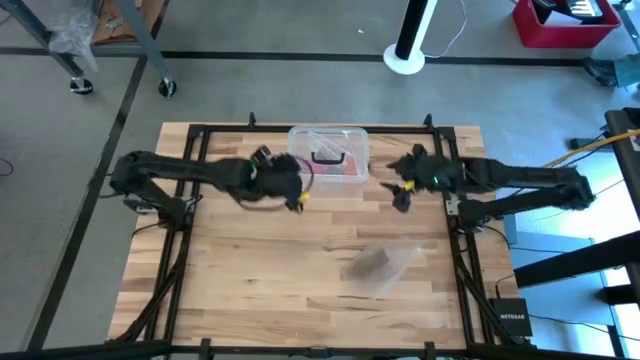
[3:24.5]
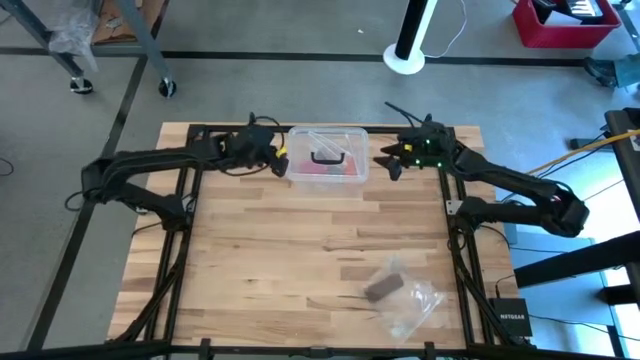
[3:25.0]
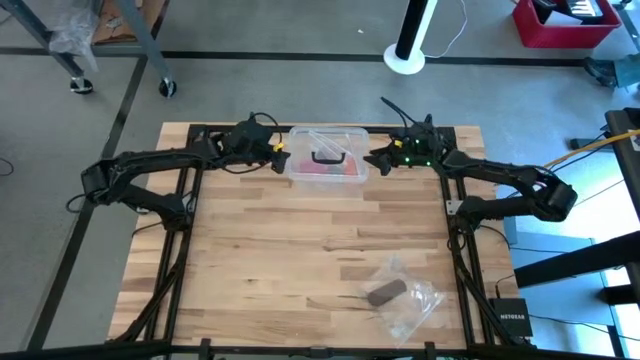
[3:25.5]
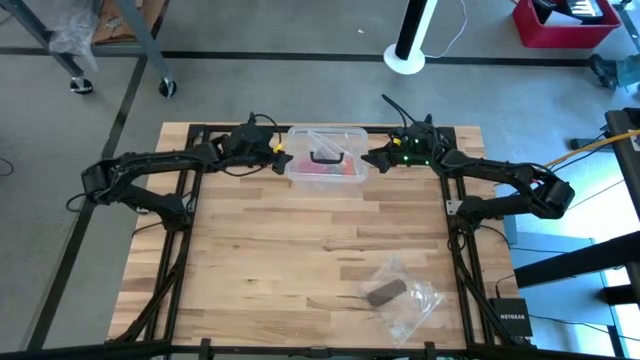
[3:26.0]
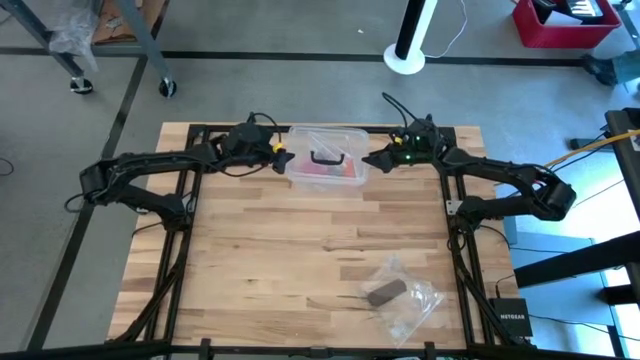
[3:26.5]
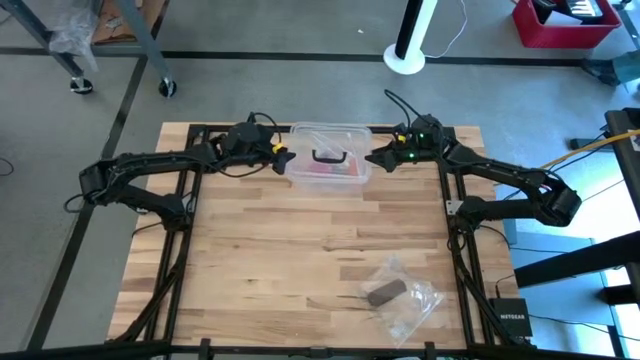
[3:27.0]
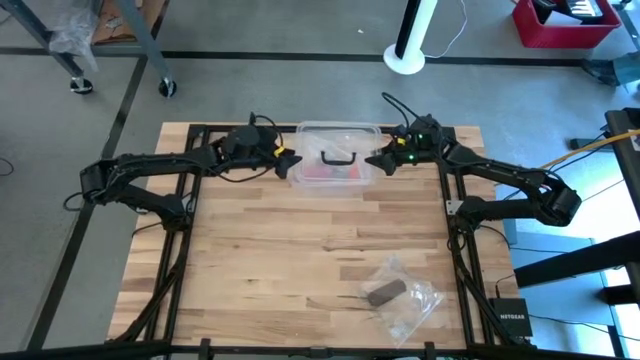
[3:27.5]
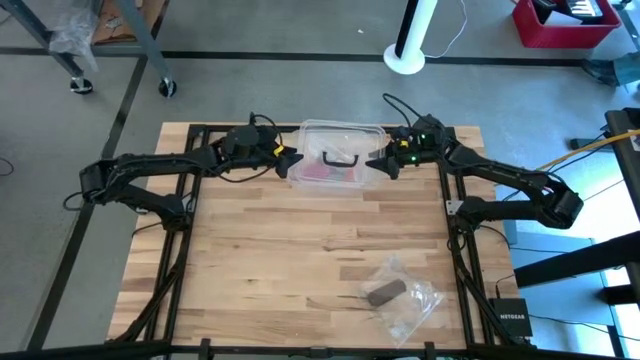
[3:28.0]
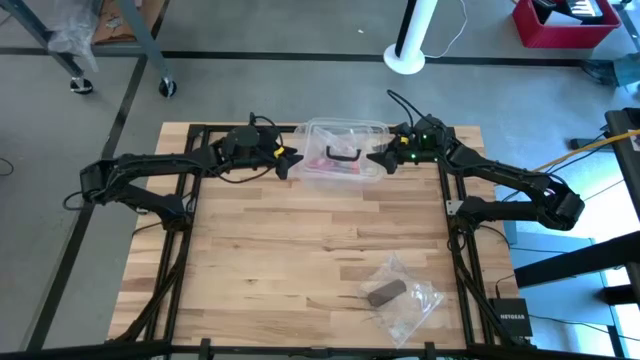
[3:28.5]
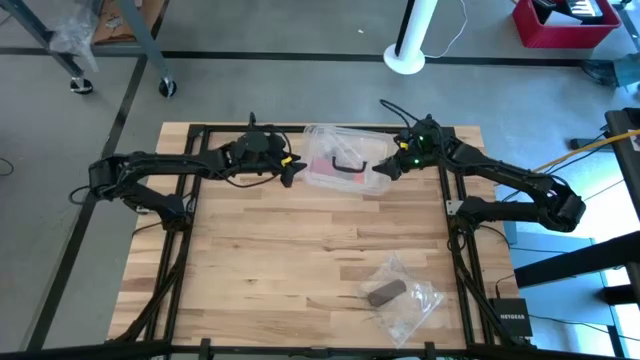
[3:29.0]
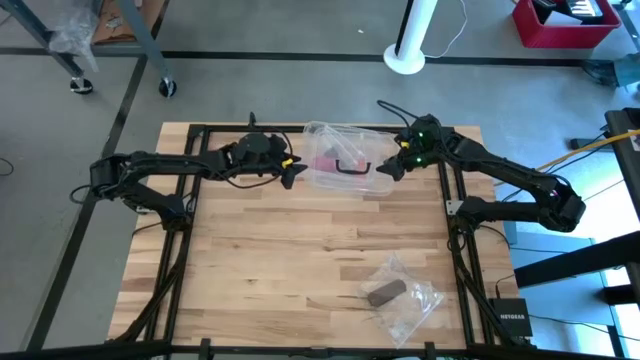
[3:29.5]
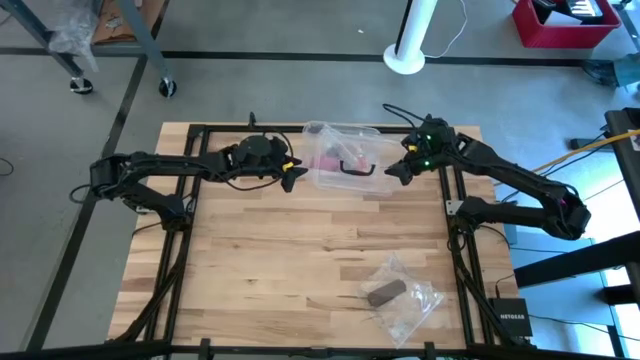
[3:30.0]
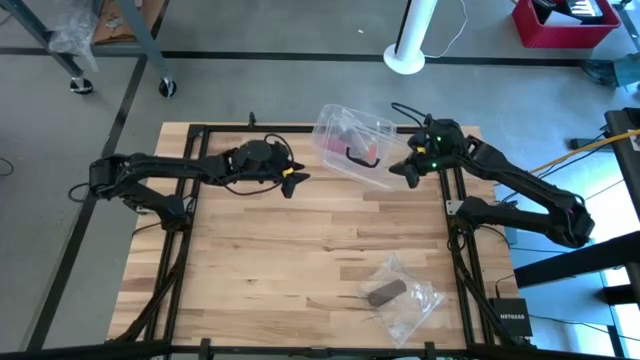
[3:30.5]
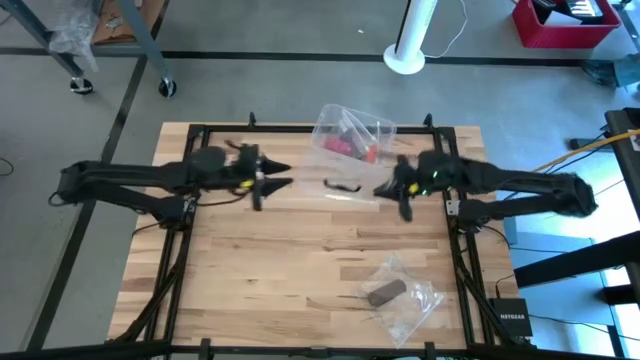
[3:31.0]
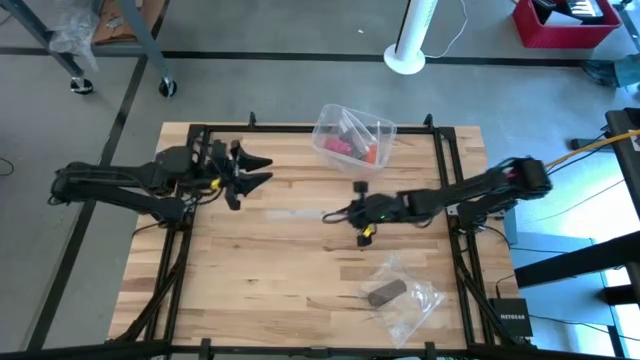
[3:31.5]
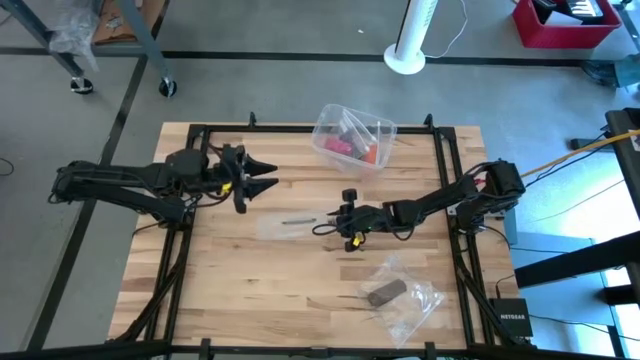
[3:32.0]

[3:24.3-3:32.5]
Task: Roll bandage
Open the transparent bin

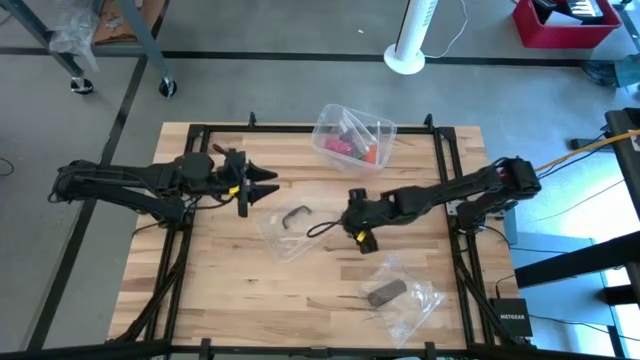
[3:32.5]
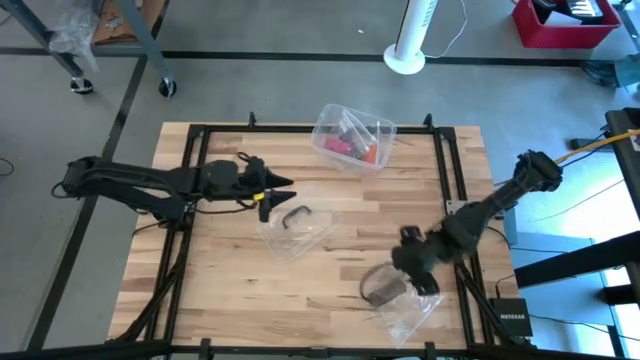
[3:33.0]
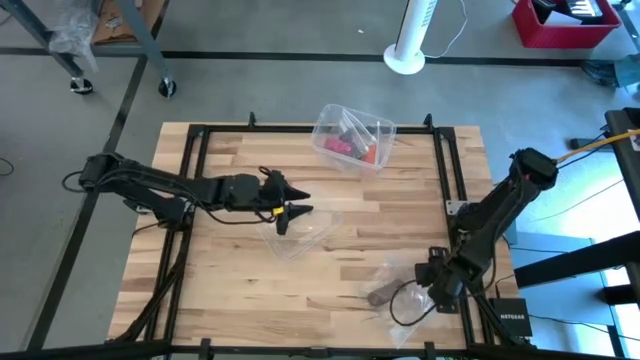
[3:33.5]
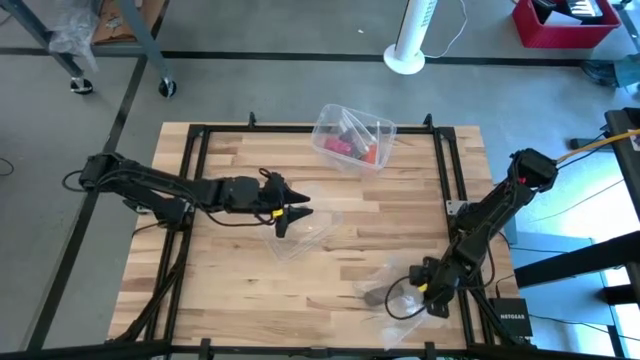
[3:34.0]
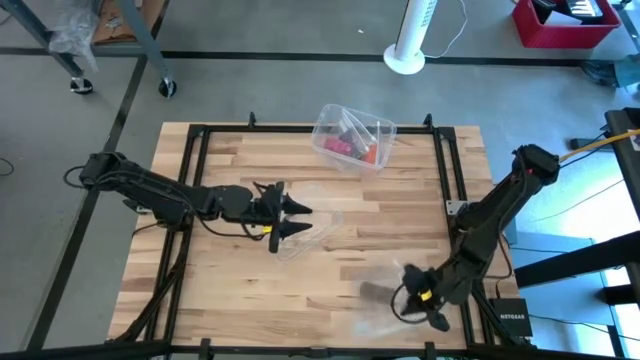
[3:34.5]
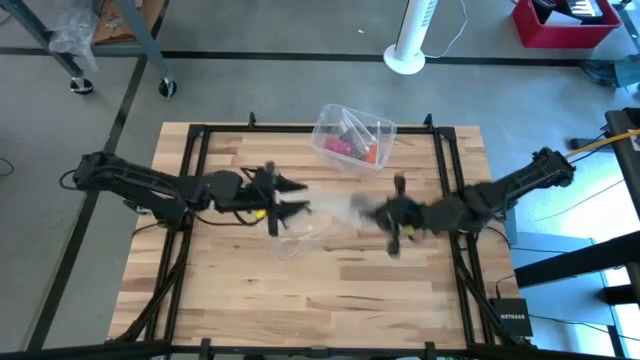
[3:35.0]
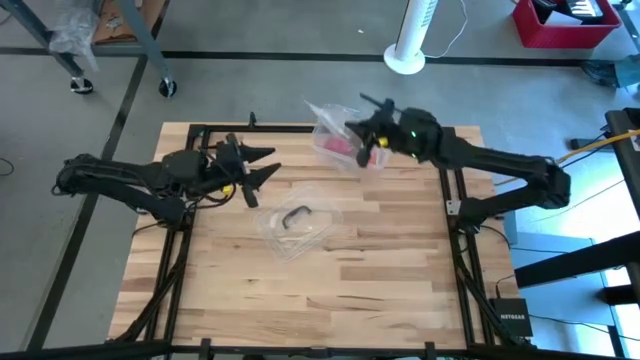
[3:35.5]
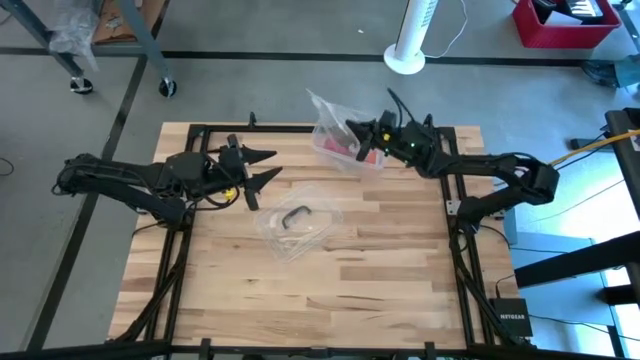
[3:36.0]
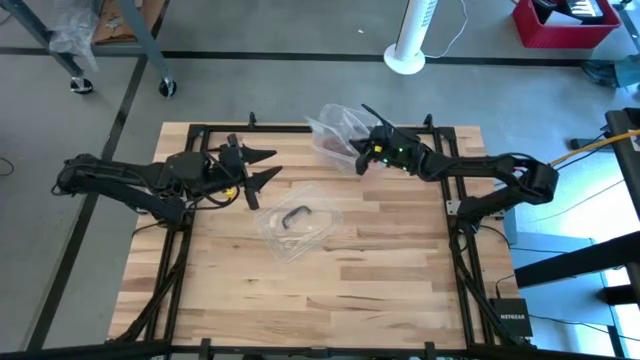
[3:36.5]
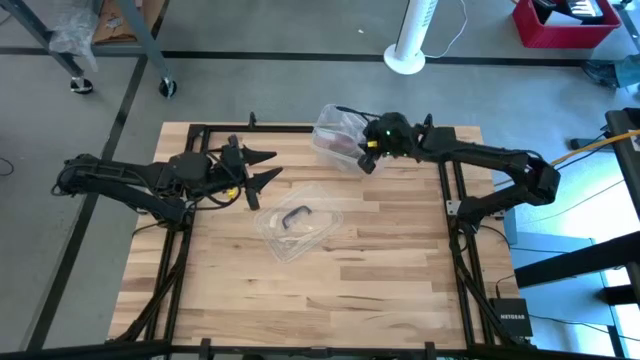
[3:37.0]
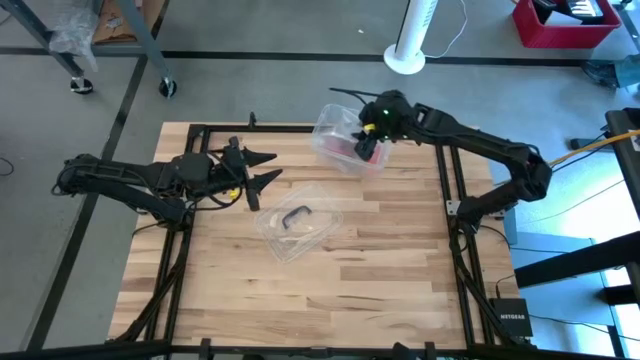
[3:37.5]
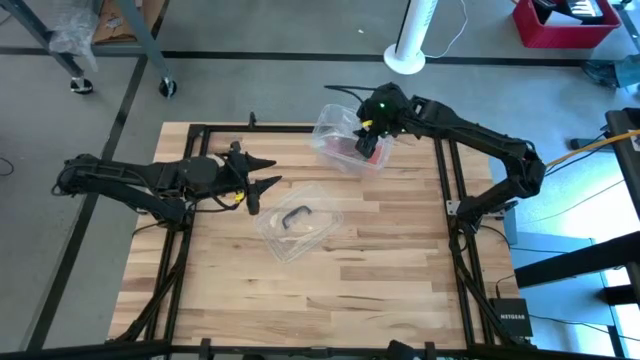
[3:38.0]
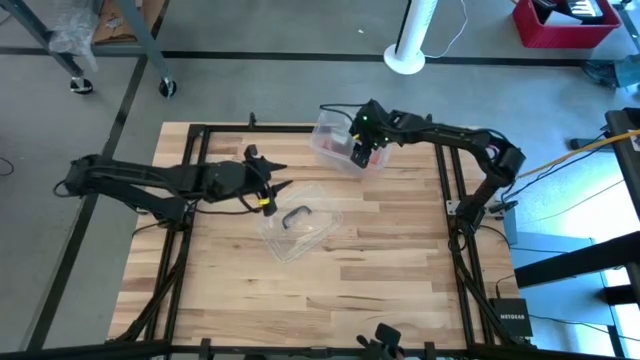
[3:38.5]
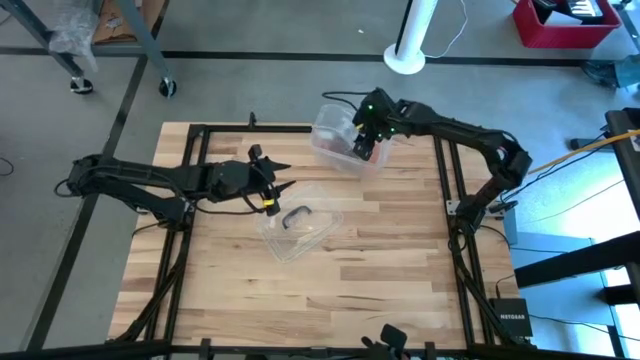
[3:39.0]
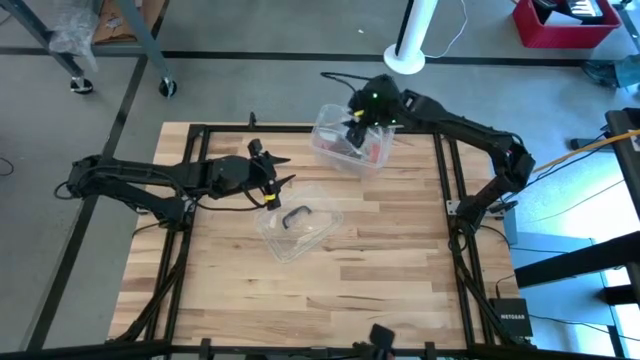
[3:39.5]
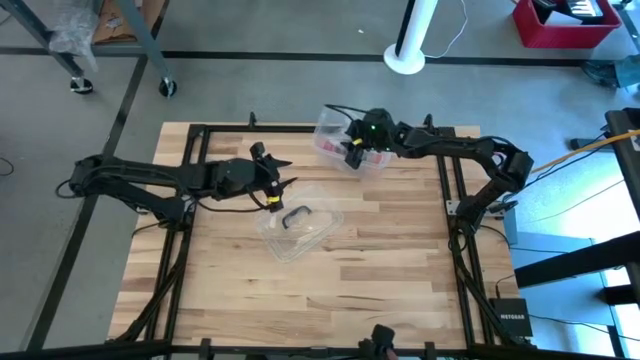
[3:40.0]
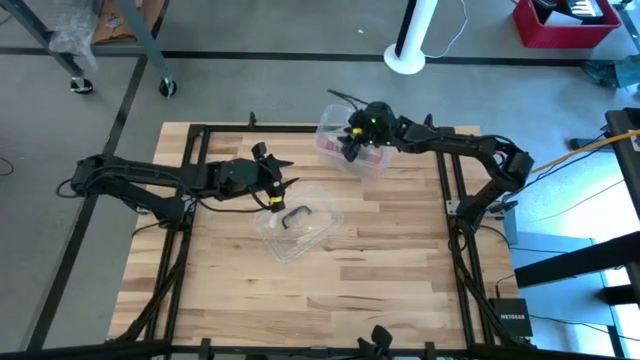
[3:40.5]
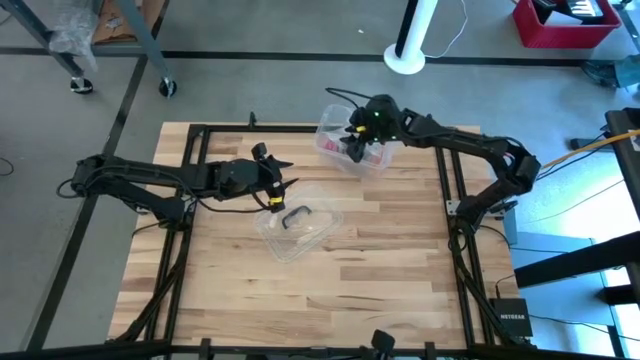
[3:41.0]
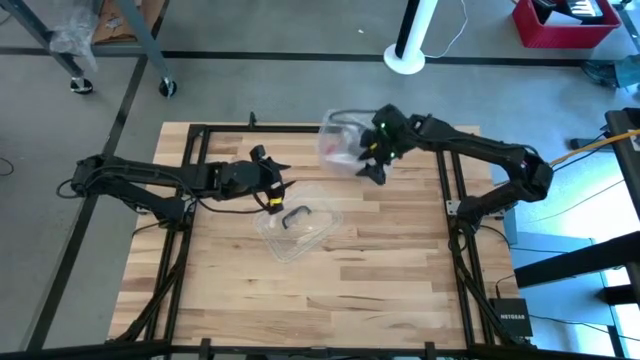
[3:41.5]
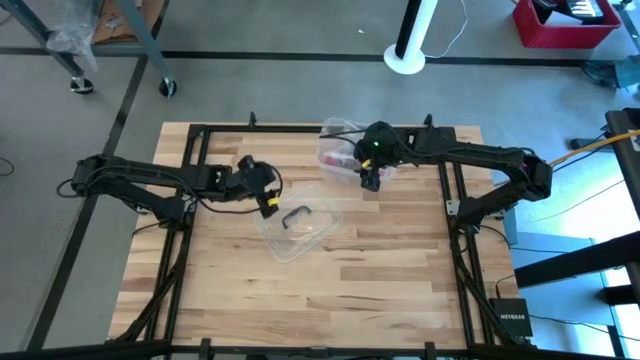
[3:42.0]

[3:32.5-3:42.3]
Put the transparent zip bag into the transparent bin

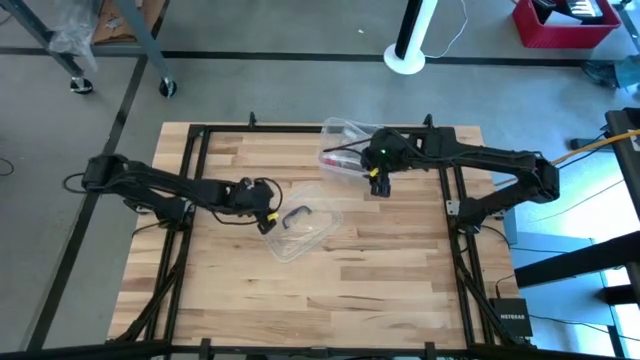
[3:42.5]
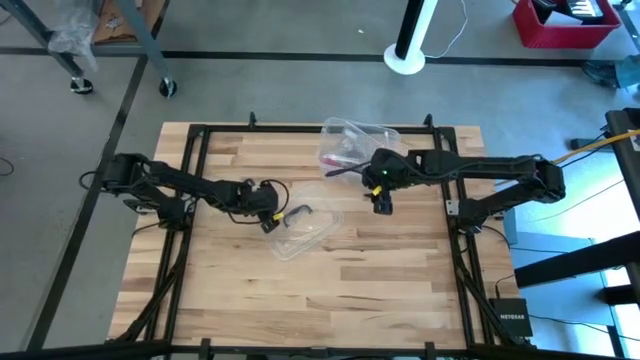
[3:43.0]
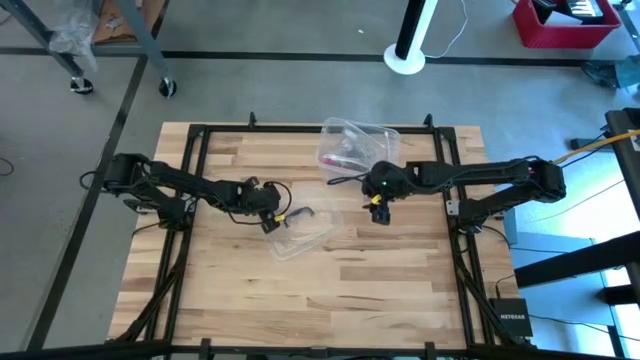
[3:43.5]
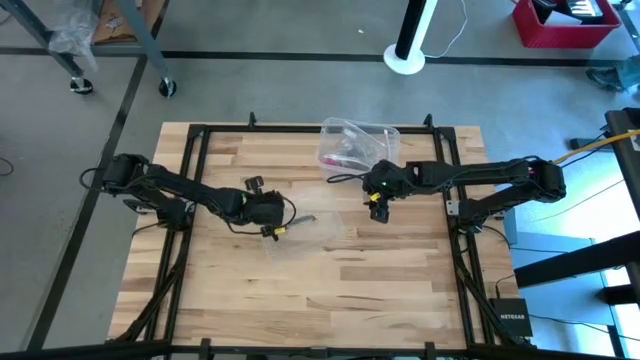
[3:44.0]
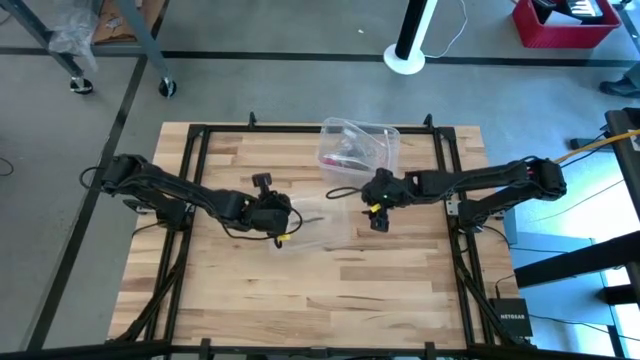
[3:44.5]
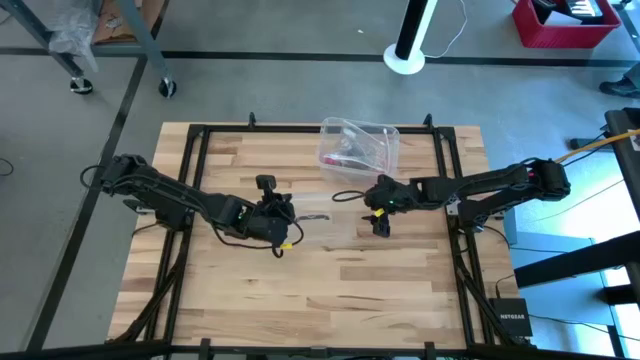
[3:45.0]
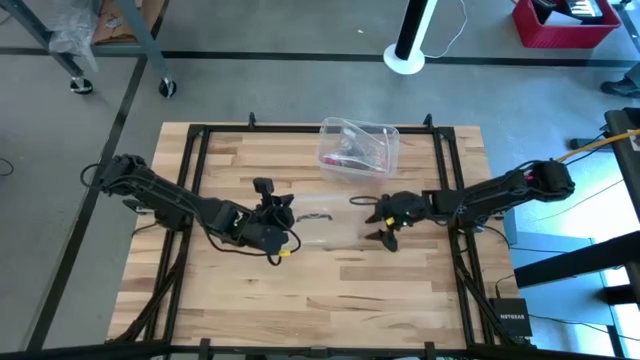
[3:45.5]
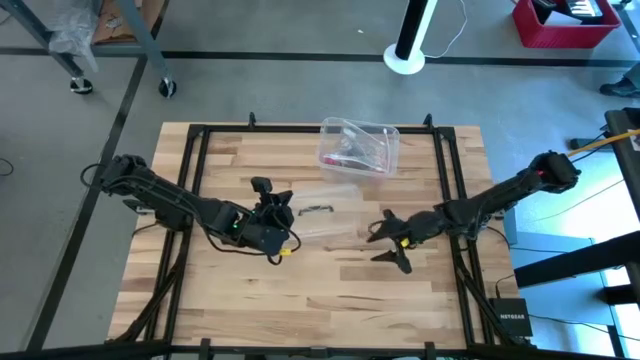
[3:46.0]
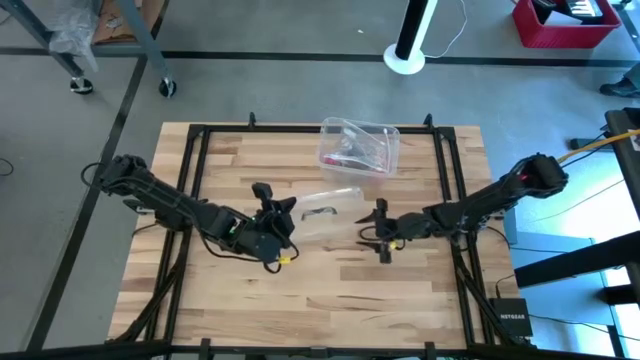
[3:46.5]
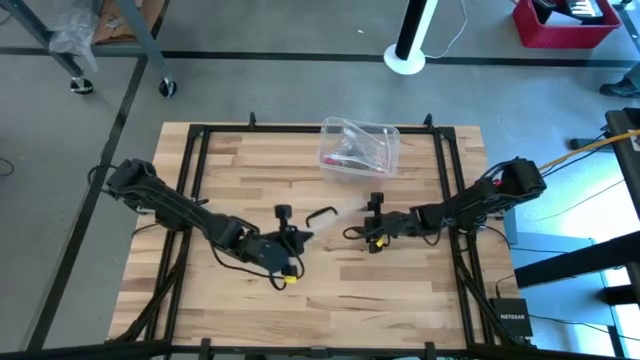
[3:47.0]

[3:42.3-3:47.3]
Close the transparent bin lid
